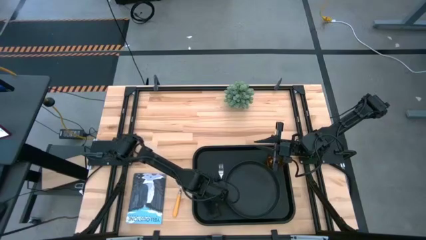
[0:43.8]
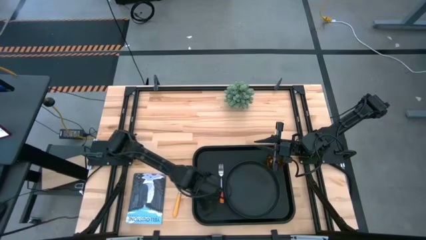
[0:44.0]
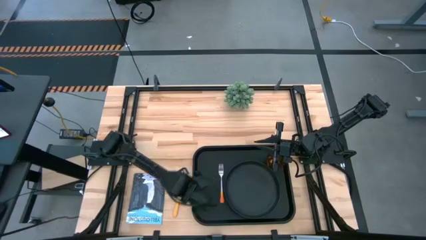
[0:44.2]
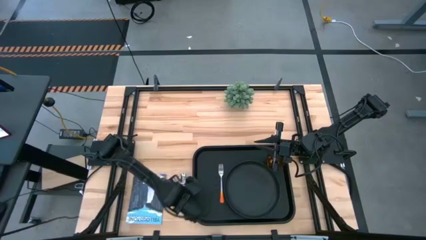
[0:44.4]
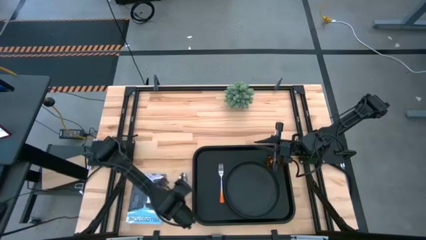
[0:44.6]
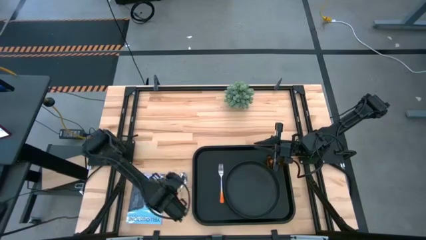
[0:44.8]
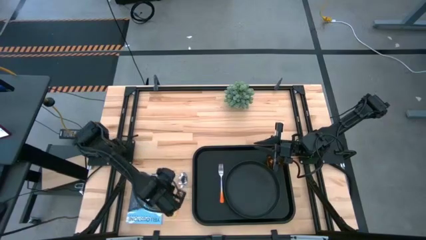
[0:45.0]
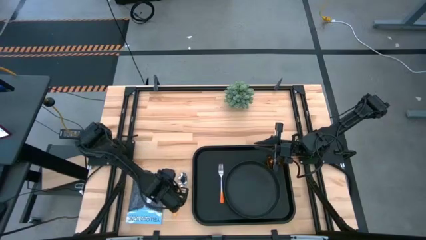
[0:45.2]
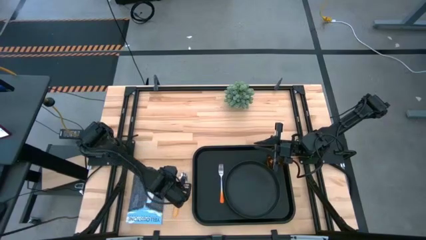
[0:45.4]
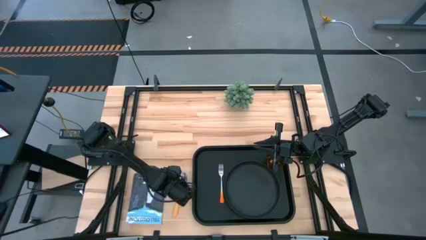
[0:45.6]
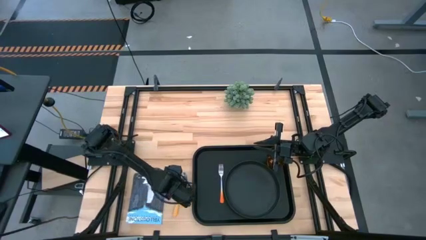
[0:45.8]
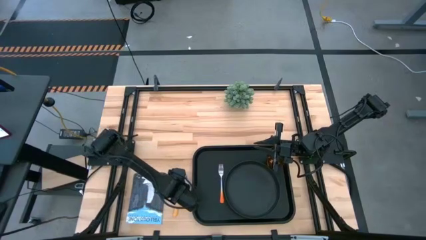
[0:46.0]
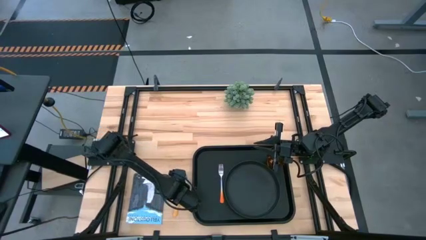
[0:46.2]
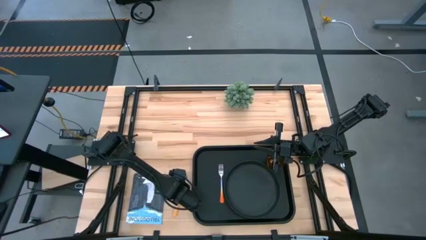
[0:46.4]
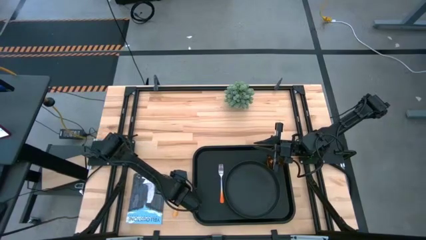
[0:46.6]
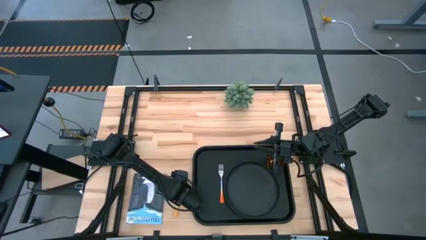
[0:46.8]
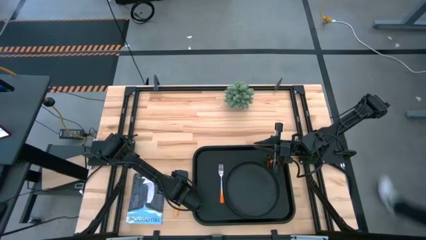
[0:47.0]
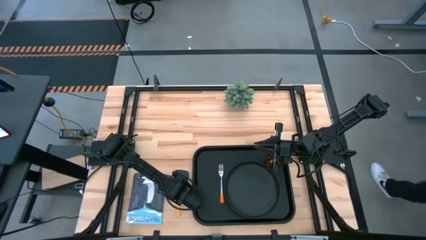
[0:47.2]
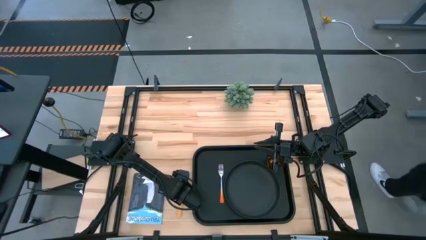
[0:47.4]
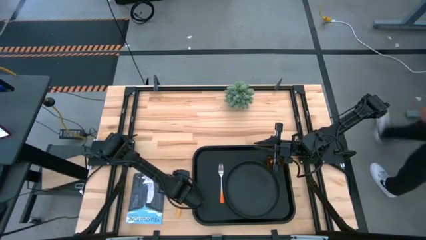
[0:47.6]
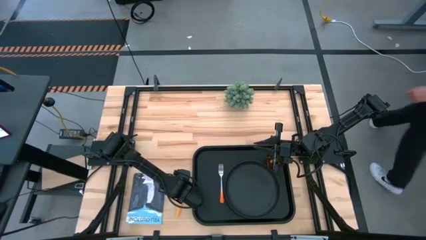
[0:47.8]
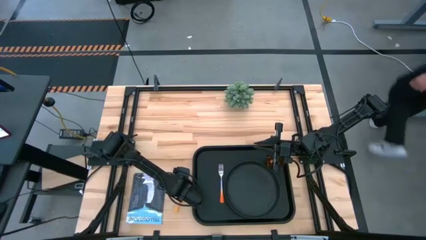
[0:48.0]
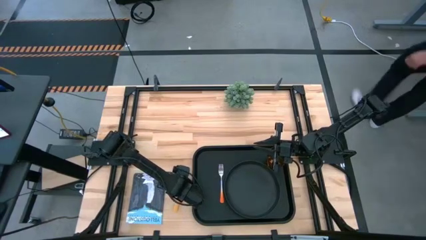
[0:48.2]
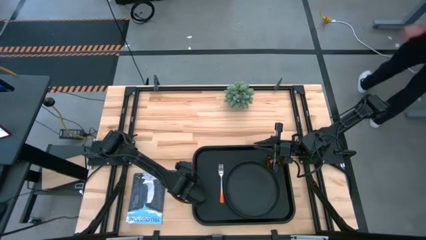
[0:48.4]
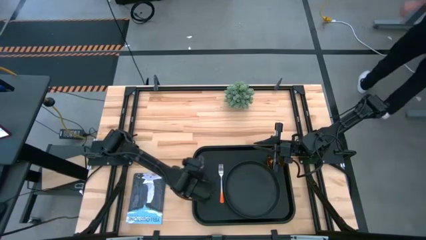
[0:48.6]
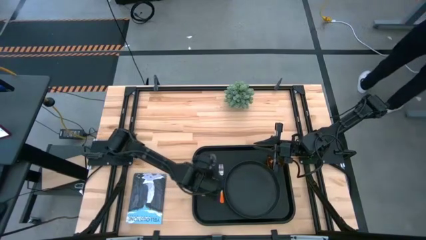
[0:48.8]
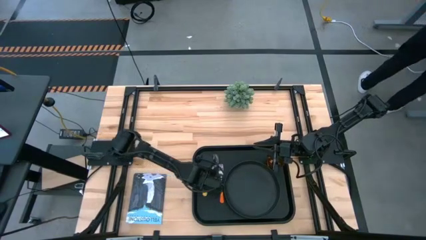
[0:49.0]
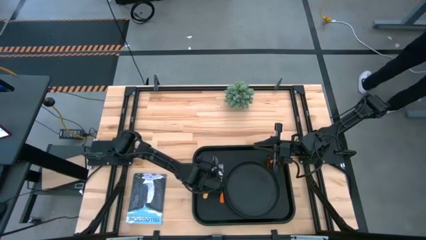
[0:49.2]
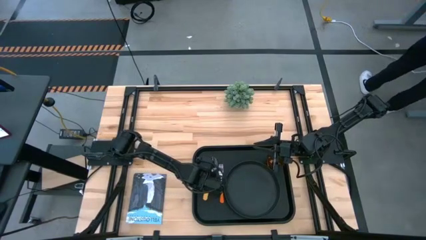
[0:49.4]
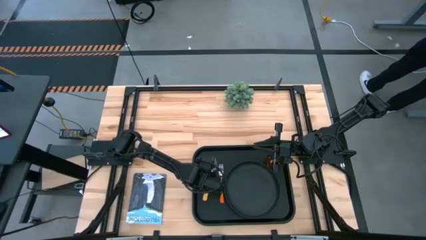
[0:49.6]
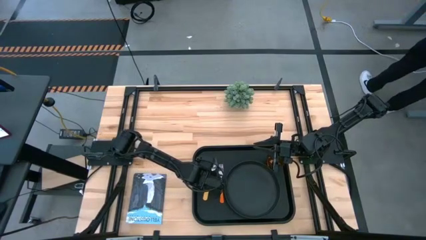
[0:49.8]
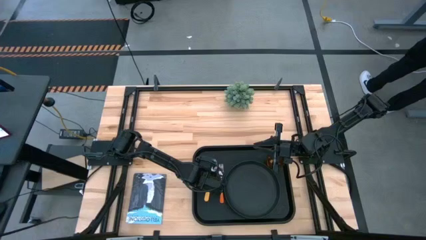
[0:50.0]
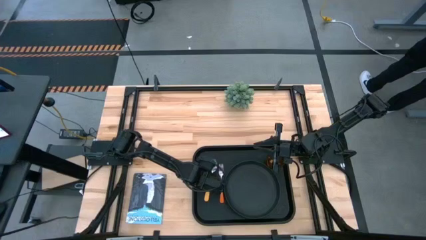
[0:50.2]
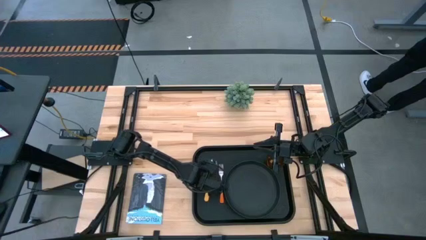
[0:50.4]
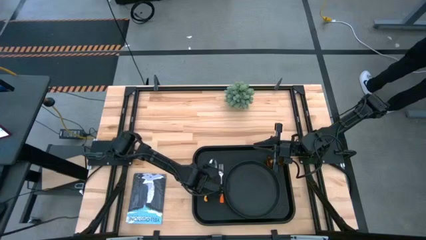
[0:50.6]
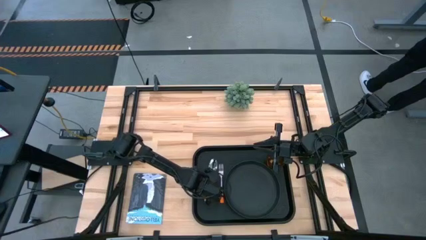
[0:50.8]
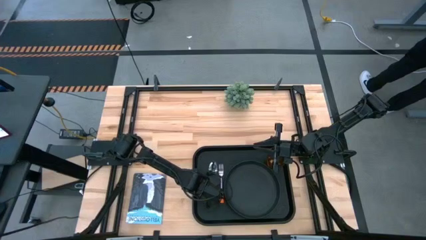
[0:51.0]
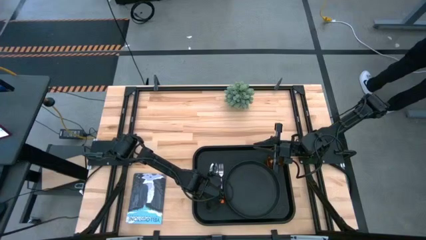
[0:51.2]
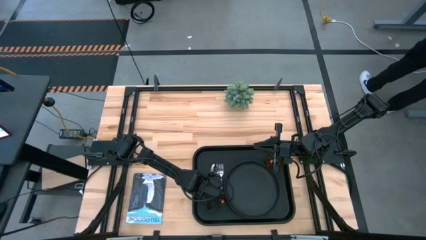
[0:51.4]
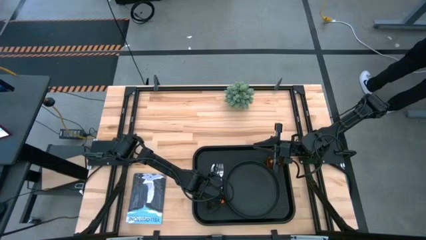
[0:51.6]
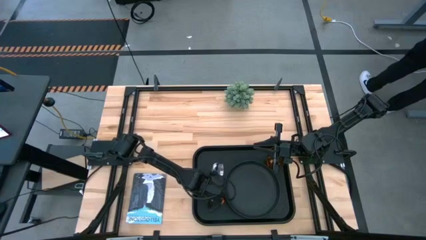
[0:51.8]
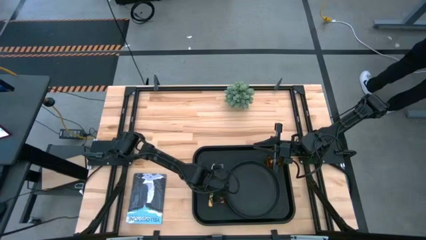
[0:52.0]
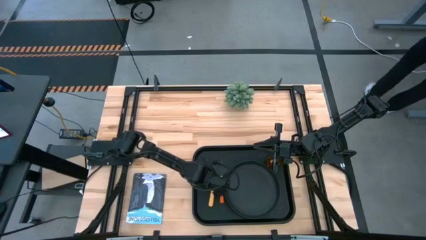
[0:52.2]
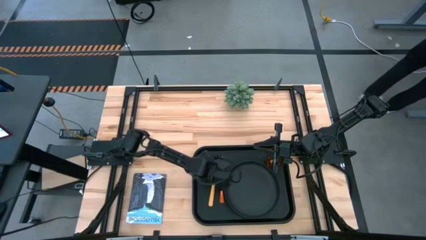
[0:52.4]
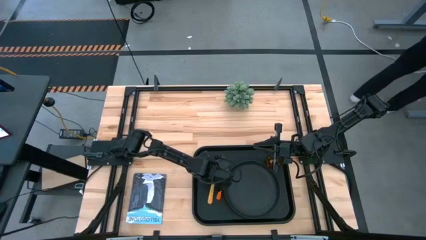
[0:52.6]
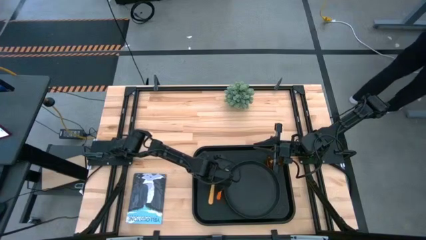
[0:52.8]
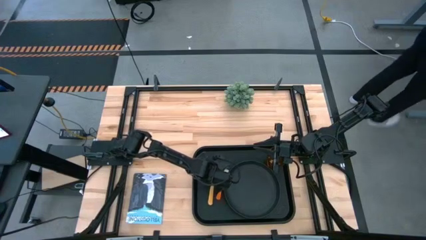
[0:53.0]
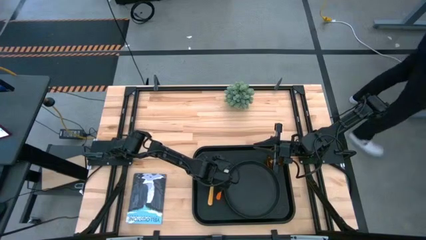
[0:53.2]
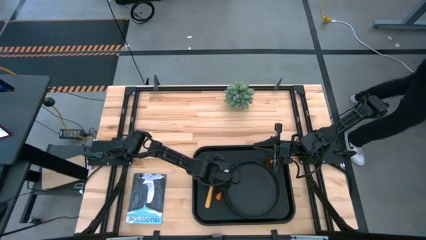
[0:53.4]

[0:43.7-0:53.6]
Task: Pick and place plate/cup/fork/spoon on tray
Put the yellow spoon on the black tray to the left of the orange spoon

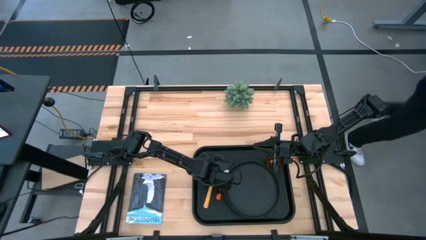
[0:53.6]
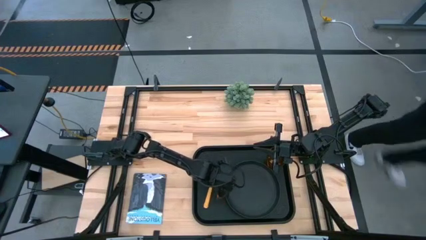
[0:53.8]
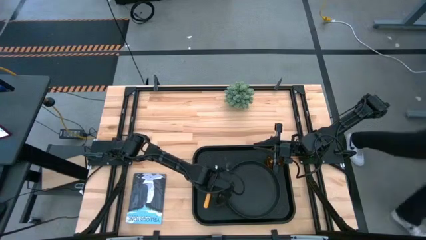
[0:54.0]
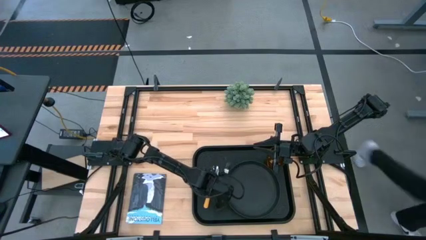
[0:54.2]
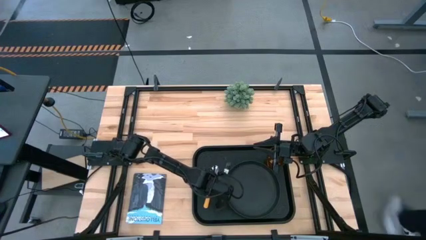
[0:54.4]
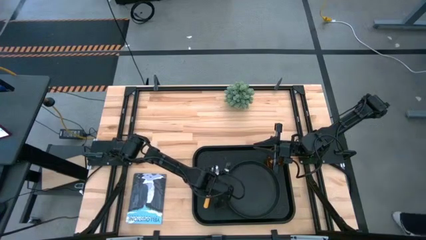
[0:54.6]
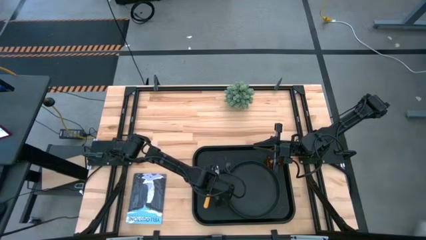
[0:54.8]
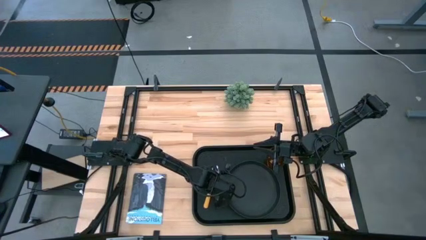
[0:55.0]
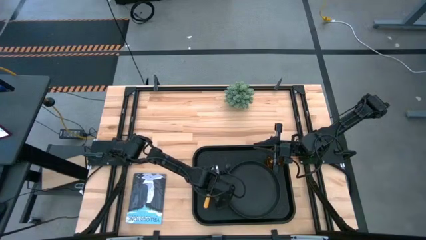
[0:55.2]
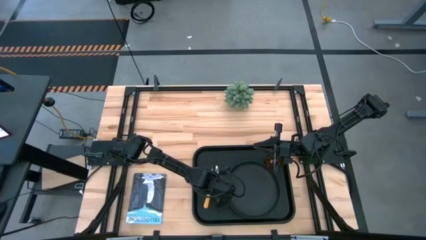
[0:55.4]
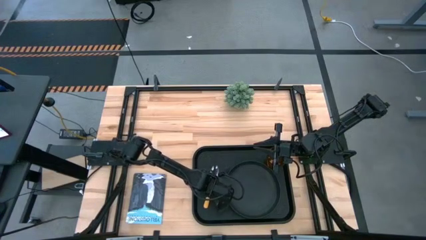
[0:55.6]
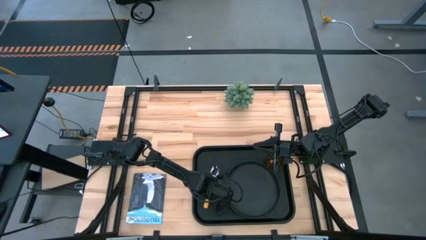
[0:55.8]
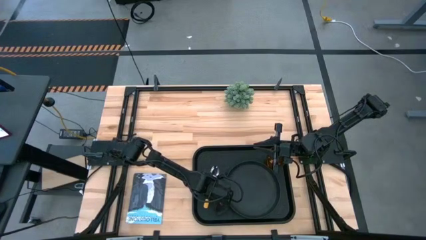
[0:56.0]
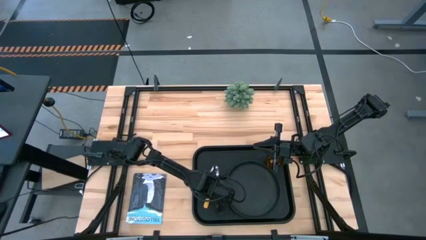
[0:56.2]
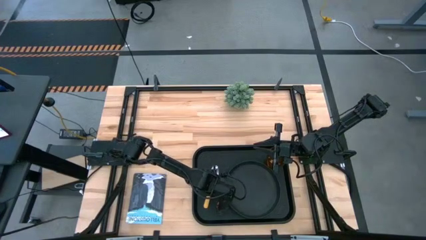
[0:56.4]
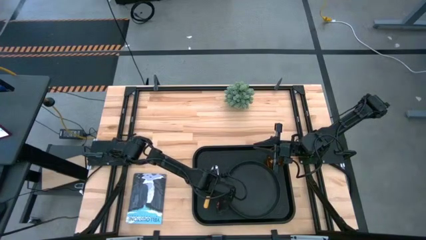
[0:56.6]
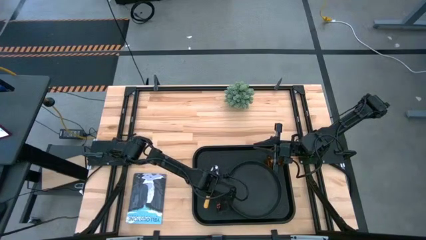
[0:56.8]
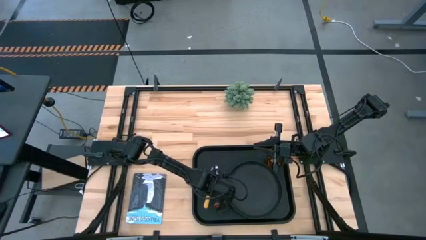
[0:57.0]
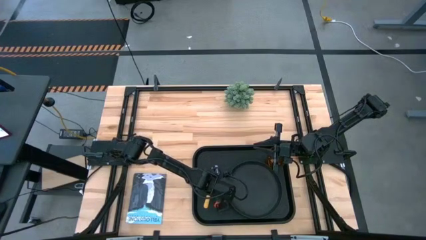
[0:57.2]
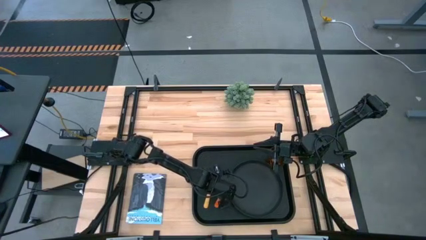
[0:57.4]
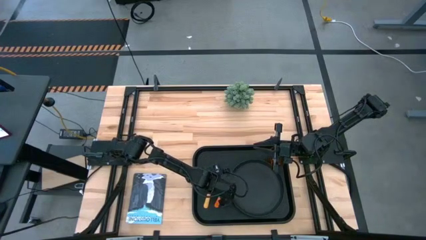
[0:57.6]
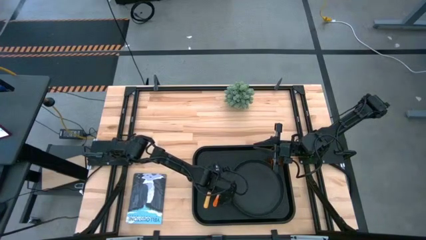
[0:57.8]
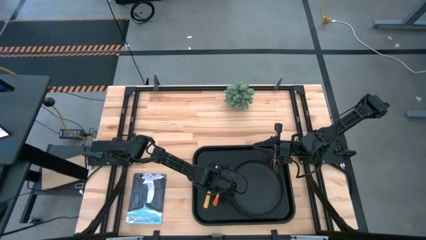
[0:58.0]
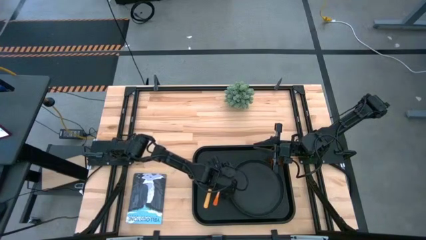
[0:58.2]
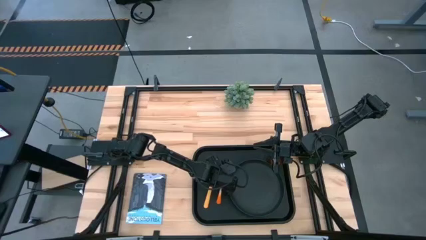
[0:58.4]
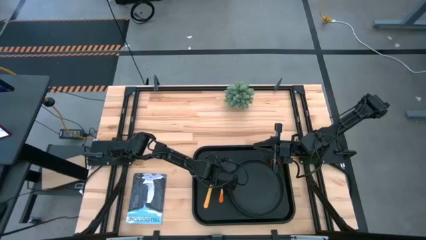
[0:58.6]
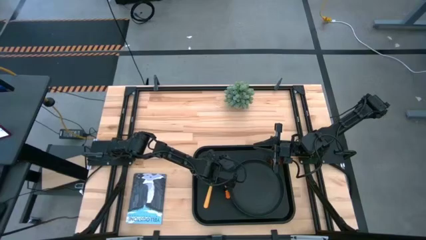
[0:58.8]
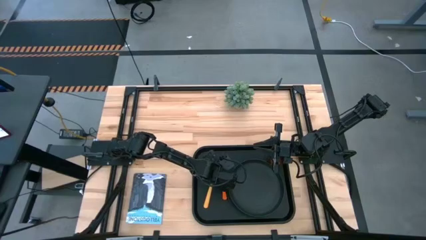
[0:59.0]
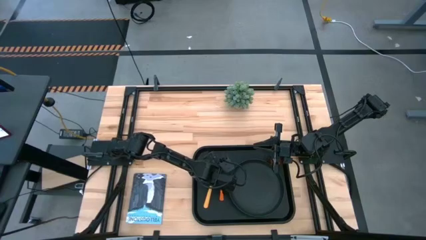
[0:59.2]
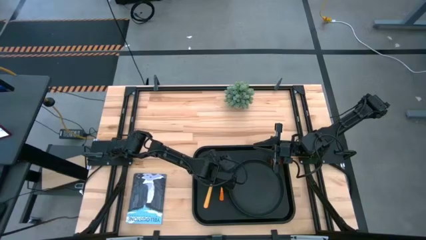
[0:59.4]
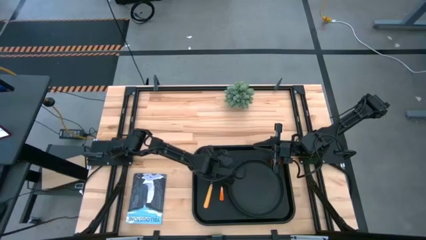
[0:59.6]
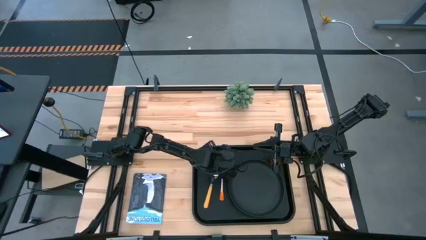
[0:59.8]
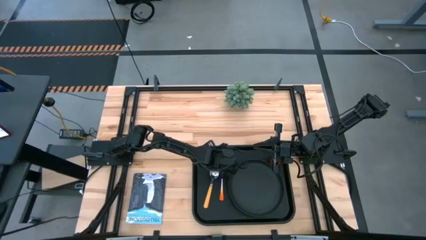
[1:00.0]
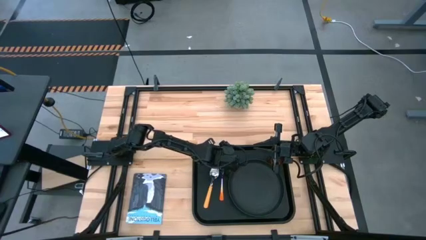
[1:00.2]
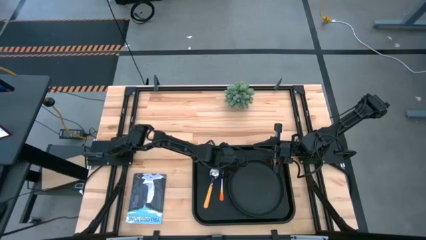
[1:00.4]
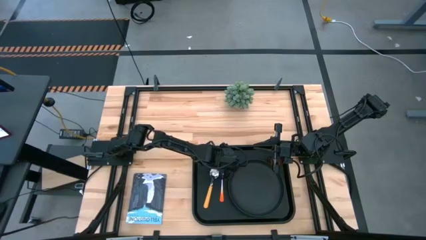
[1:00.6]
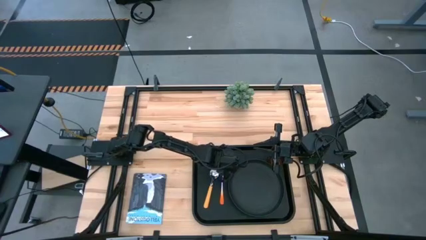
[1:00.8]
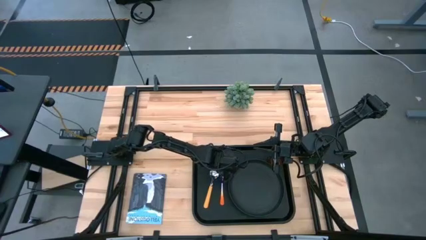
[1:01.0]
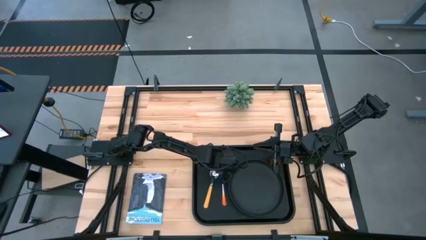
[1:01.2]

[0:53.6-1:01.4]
Adjust the orange fork on the black tray
